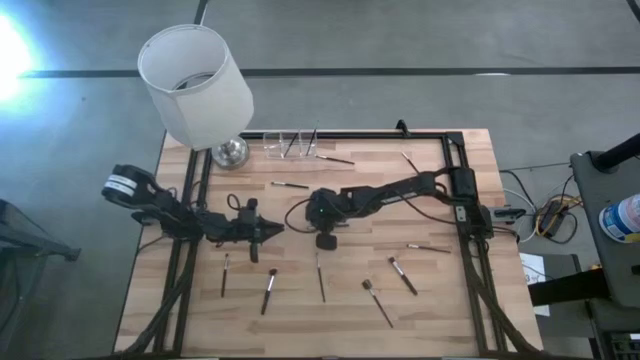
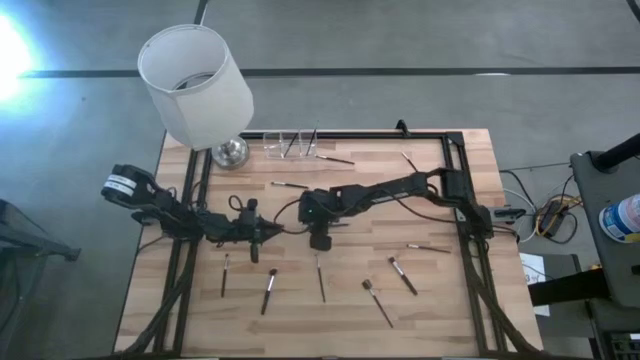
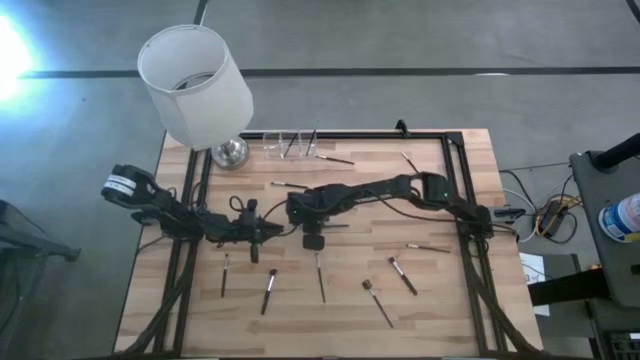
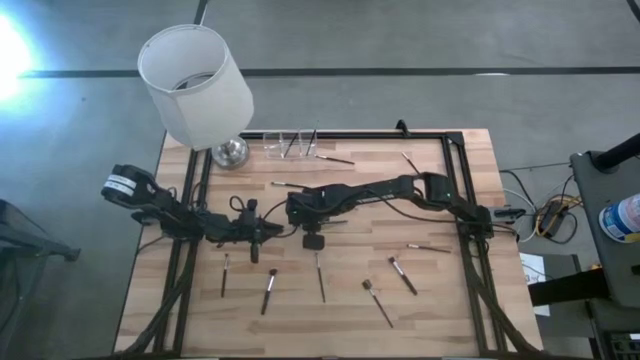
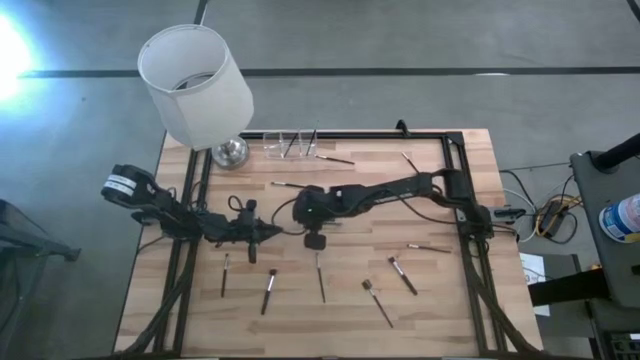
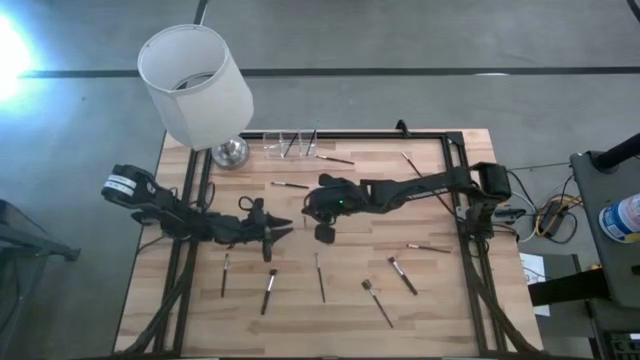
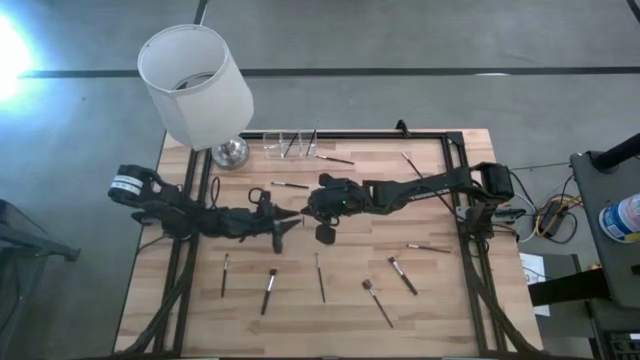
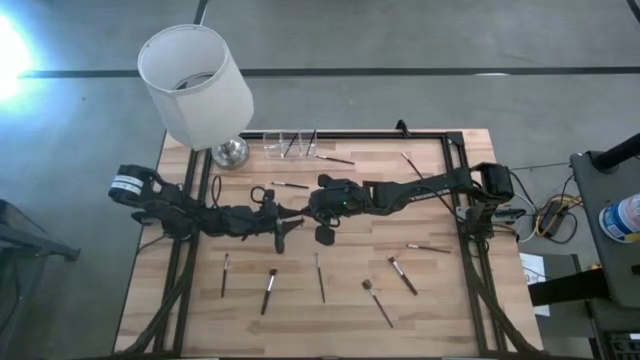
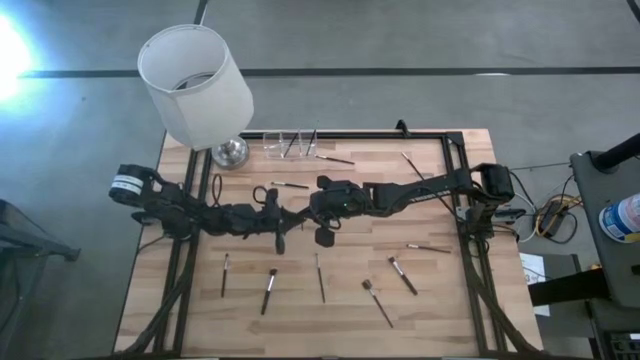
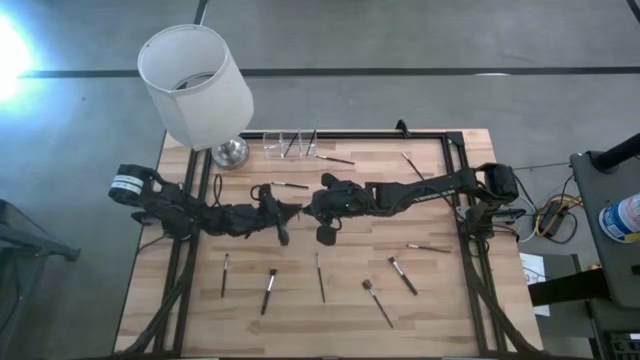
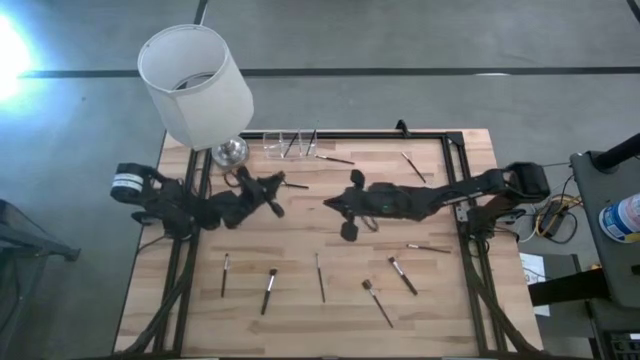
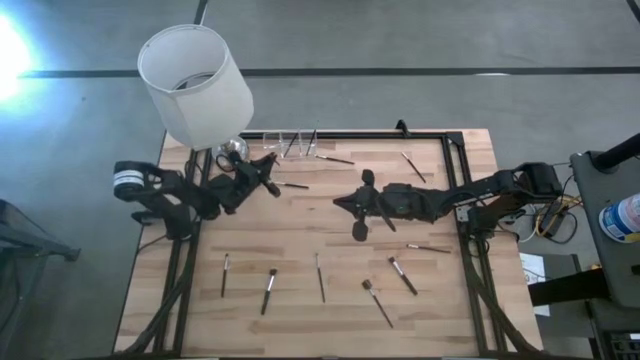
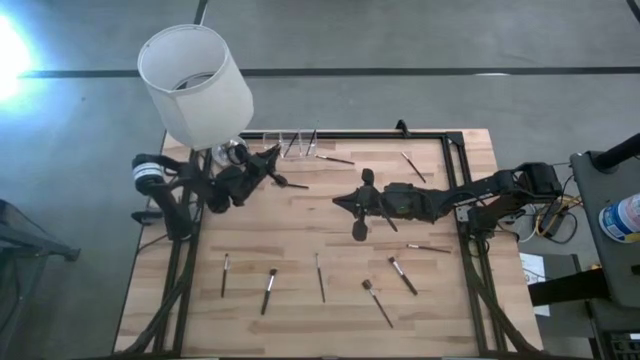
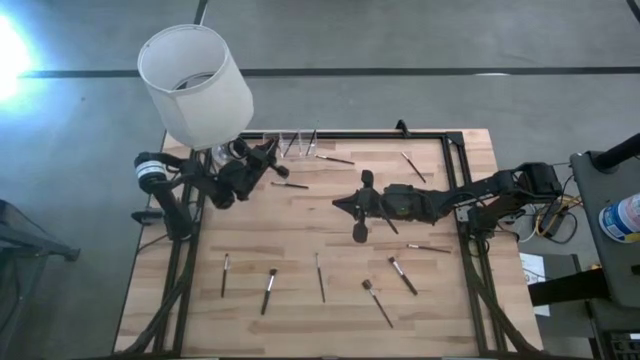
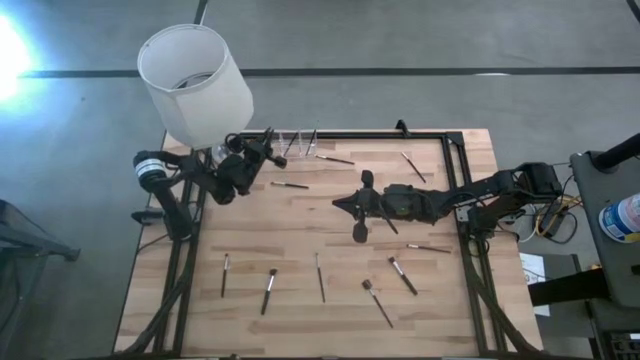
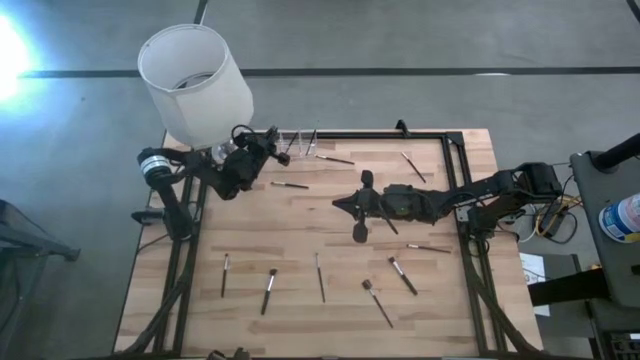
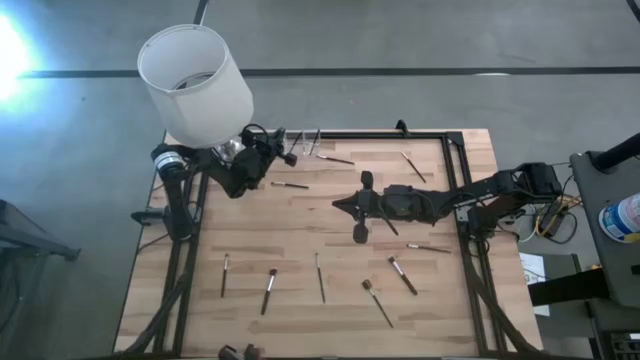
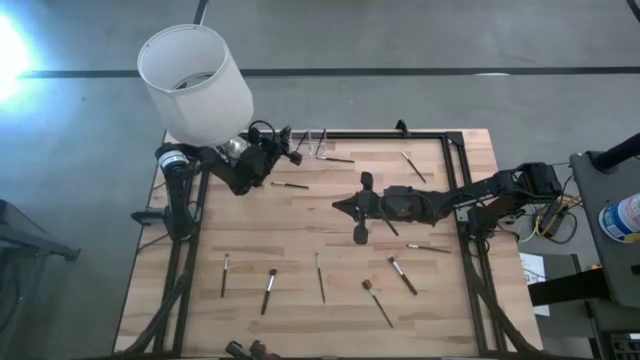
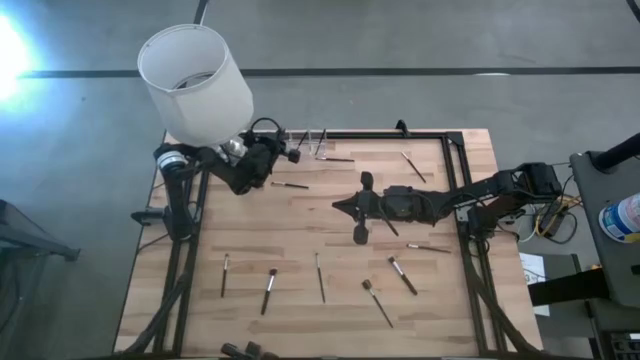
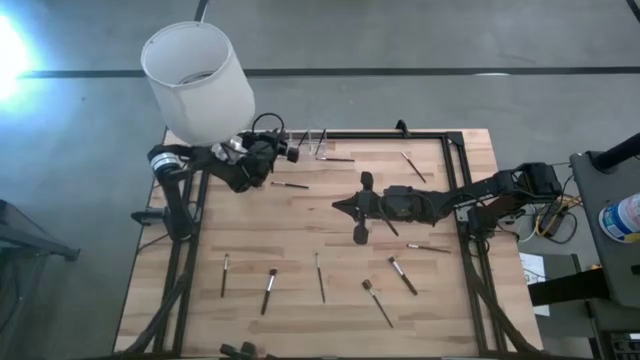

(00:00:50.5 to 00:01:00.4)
Task: Put items in baskets/containers
Put the eyeshadow brush into the transparent organizer

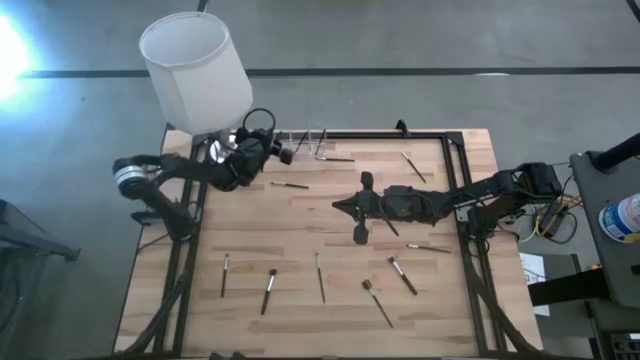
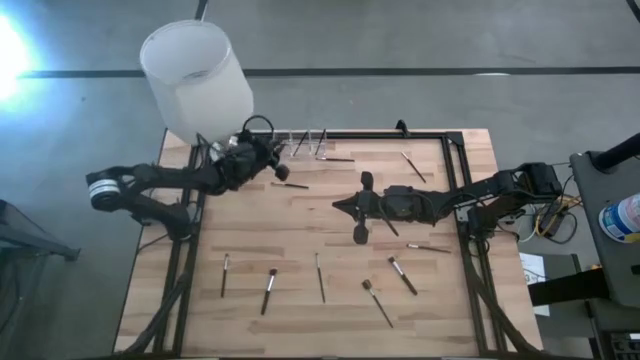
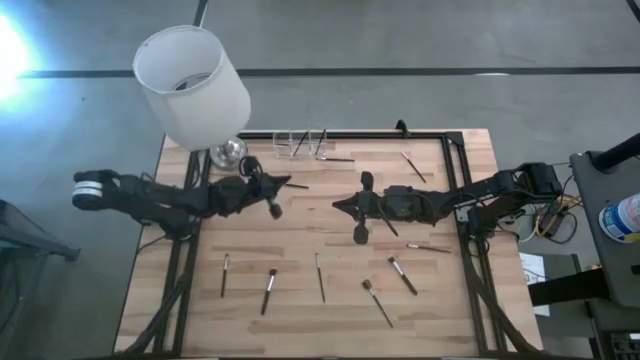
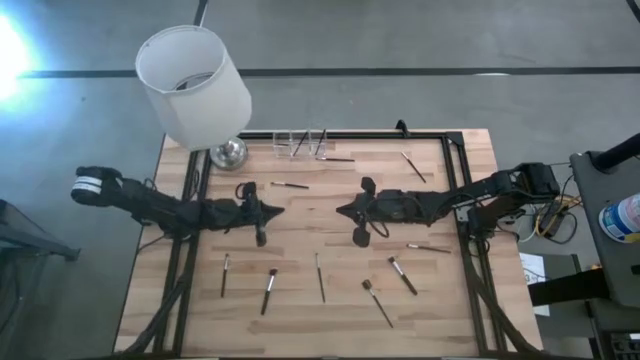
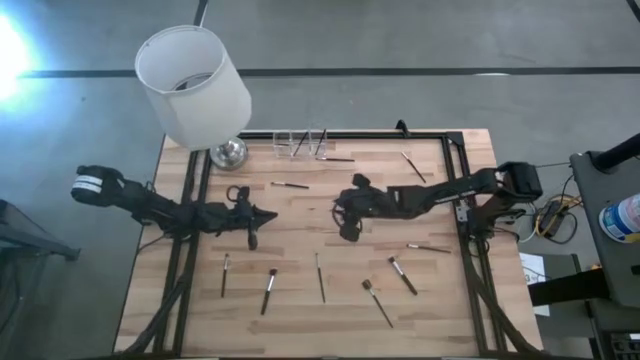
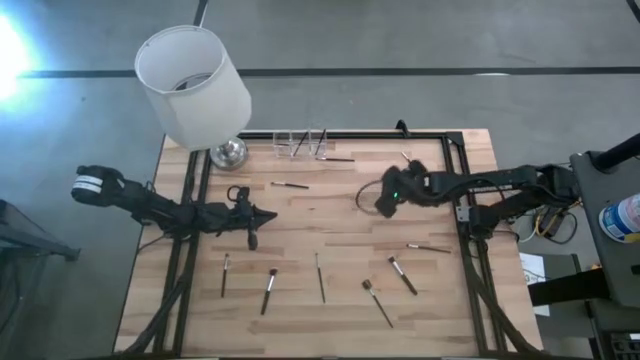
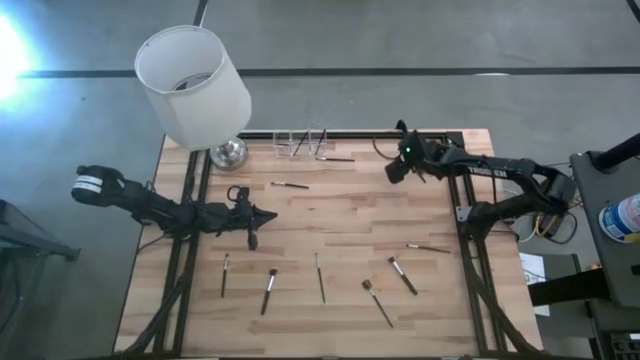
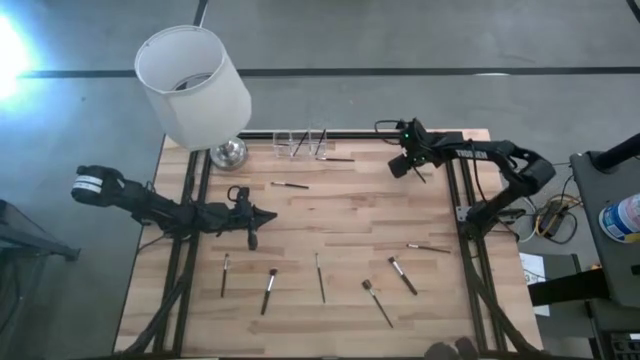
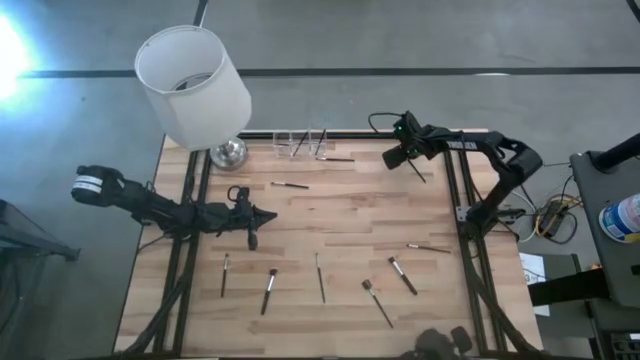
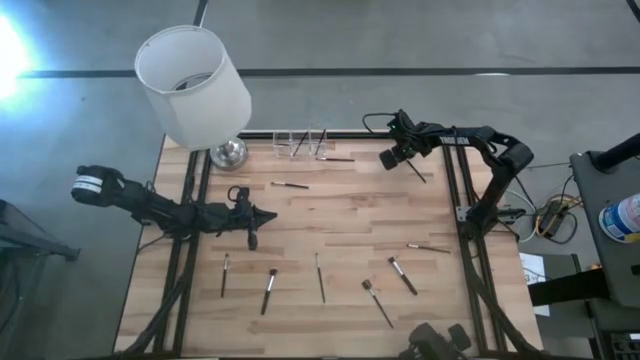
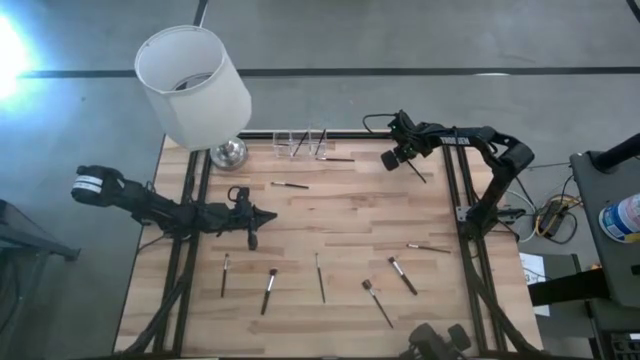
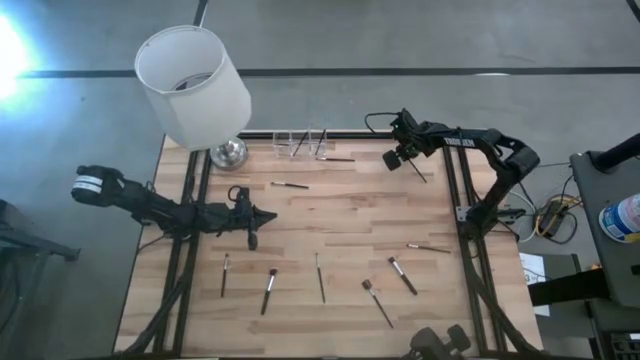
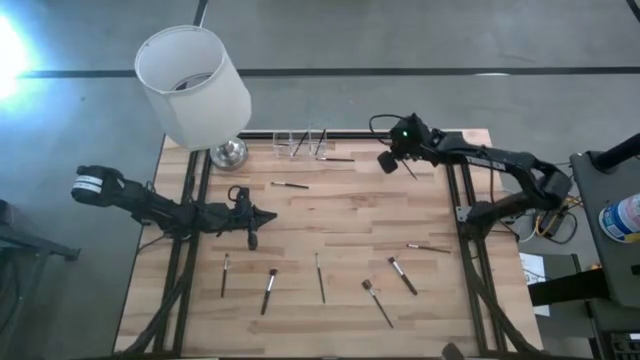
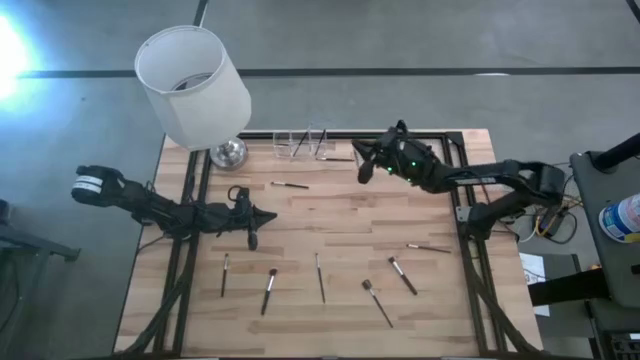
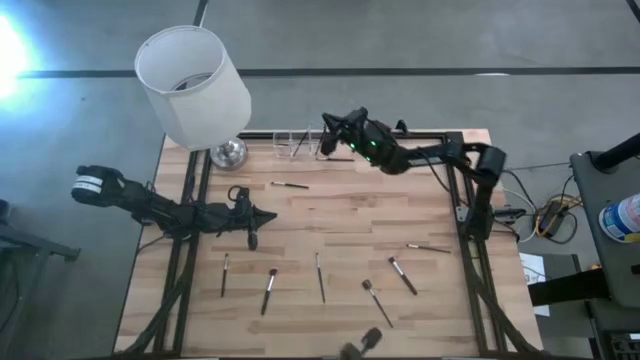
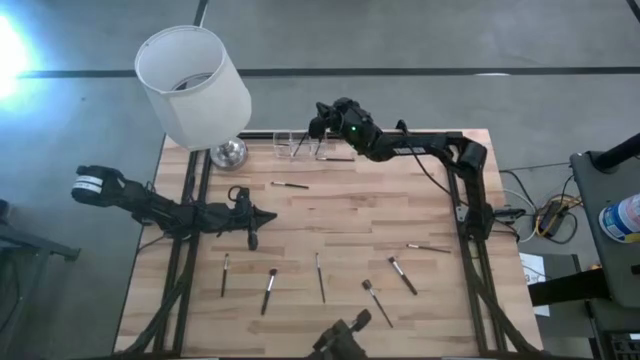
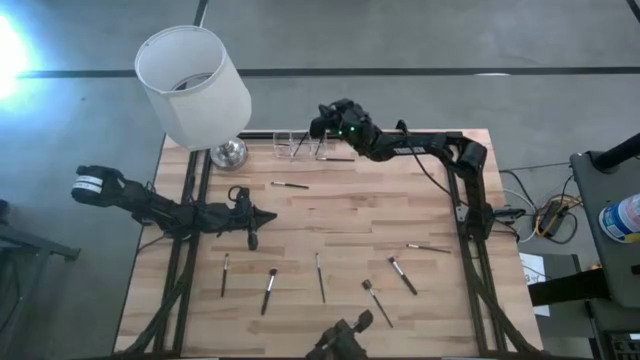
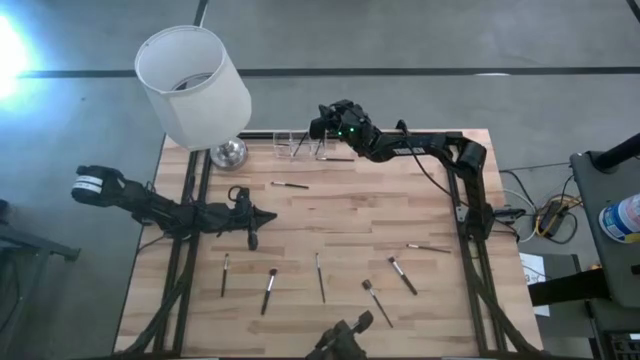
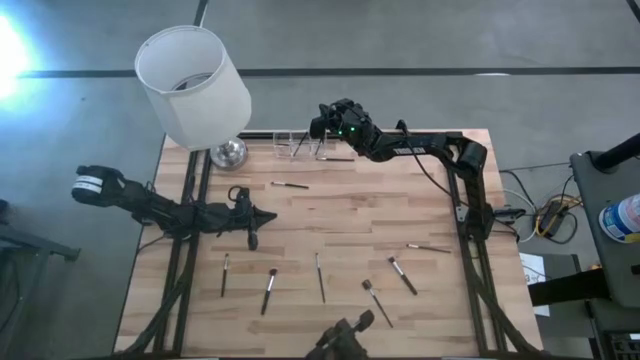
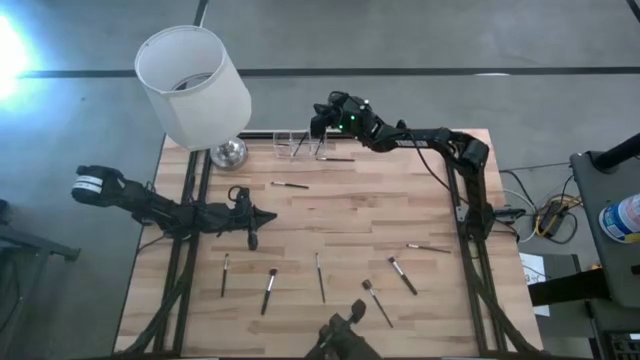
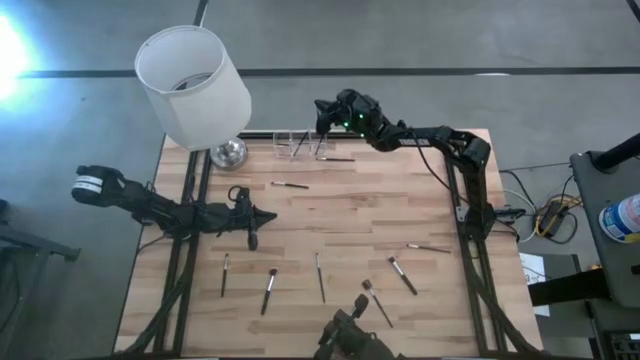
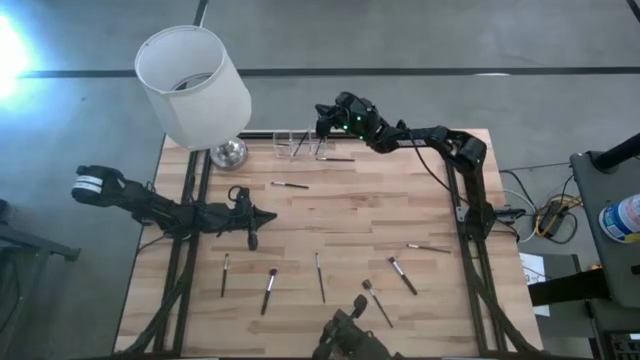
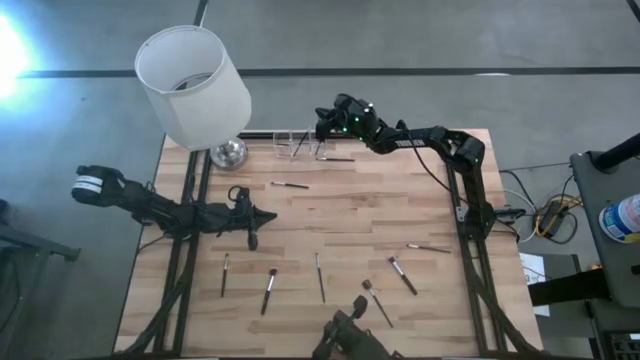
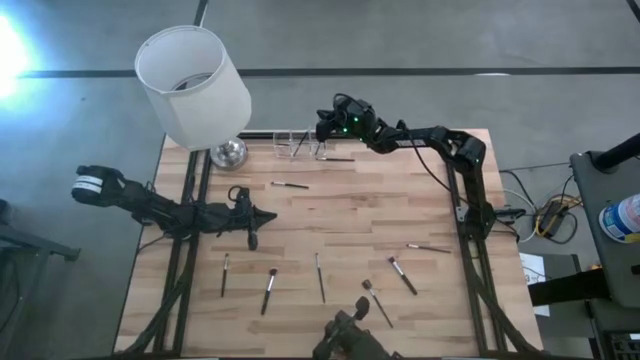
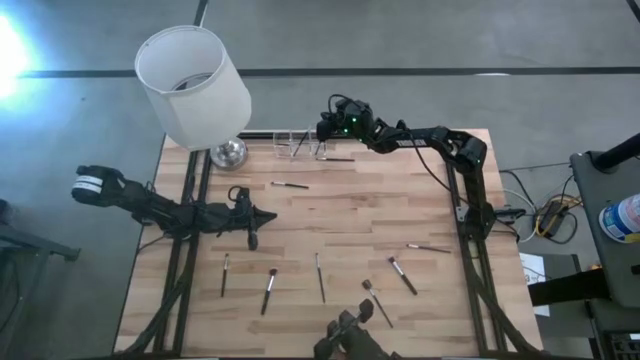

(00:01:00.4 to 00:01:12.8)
Put the eyeshadow brush into the transparent organizer
